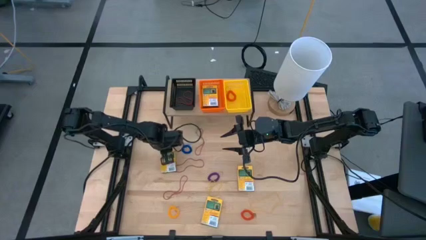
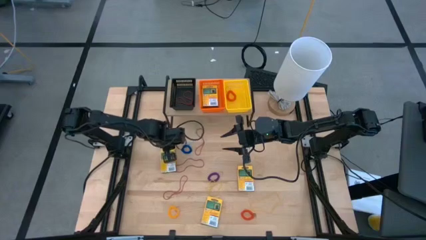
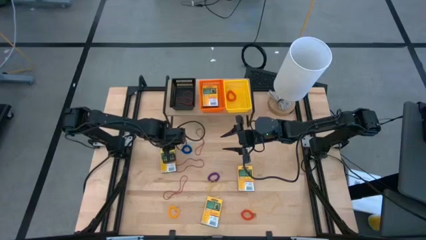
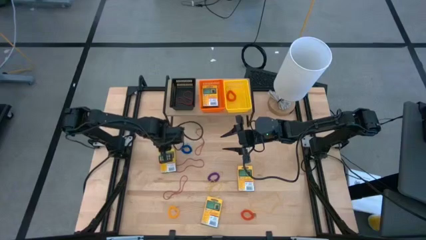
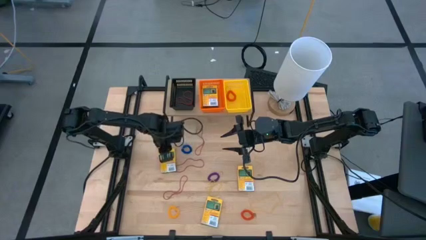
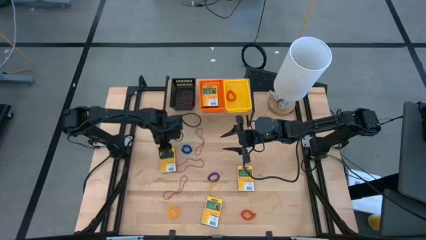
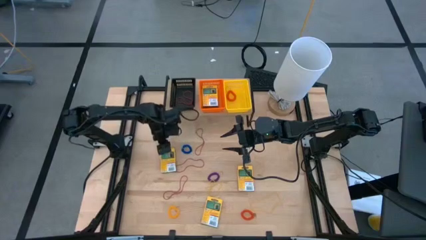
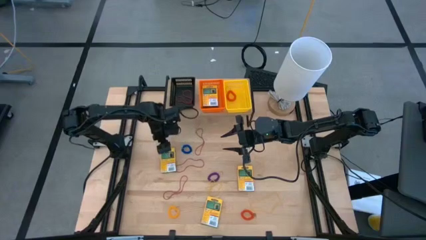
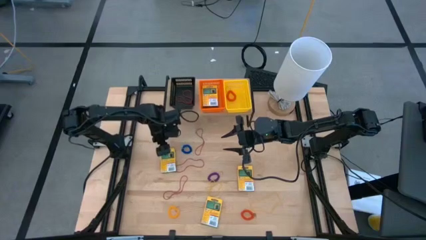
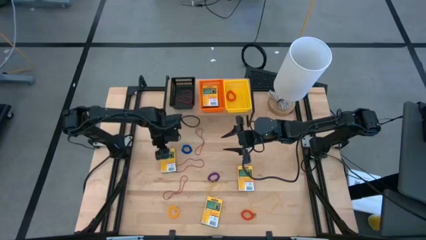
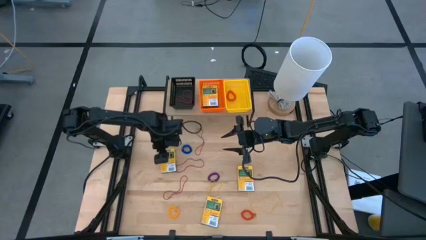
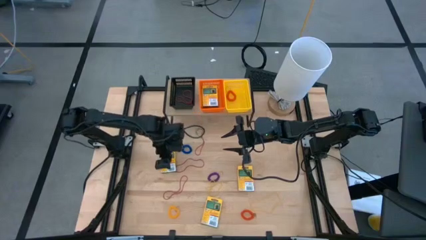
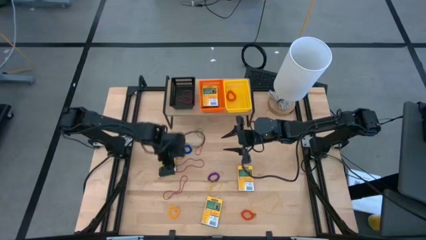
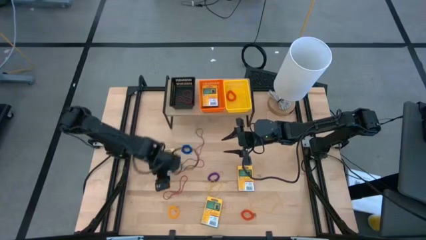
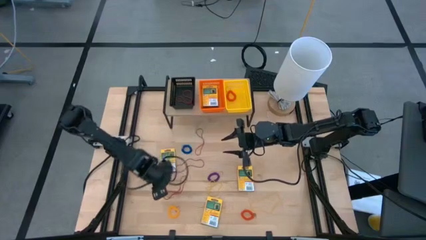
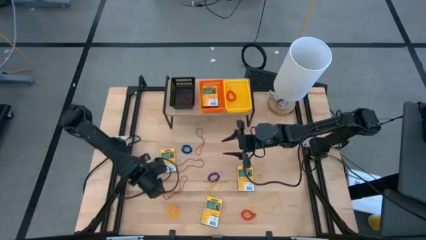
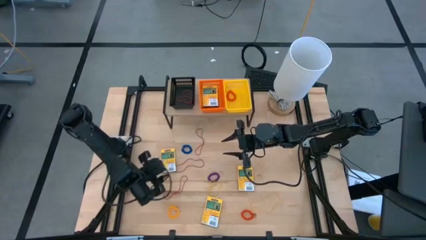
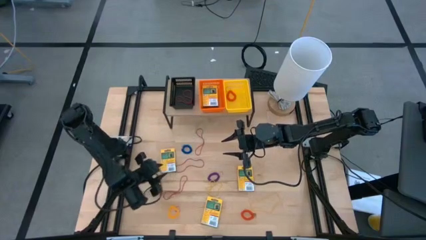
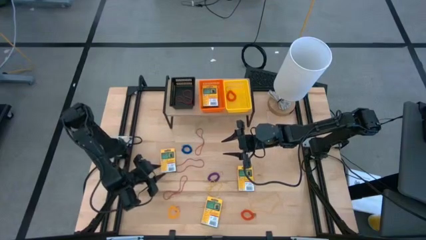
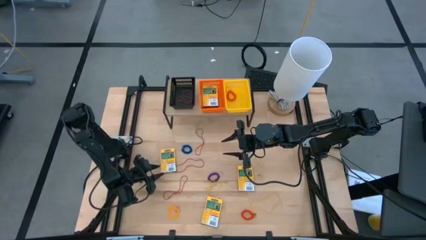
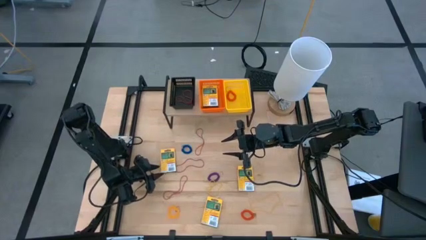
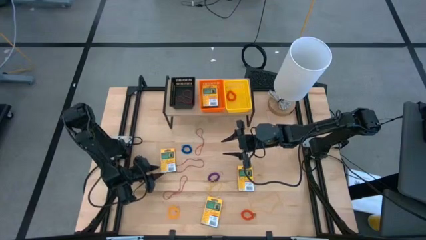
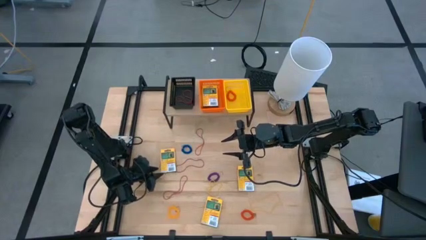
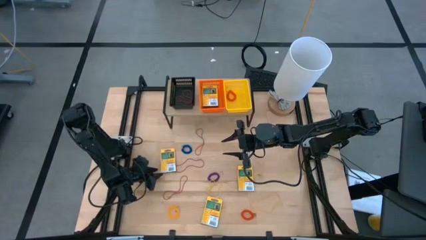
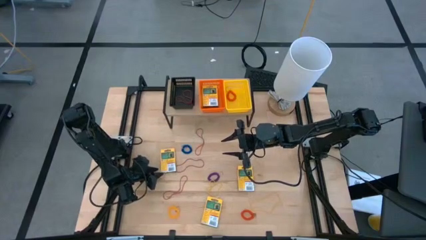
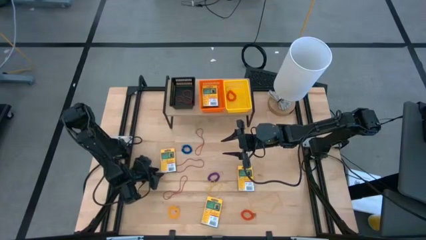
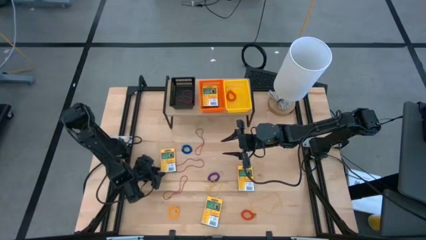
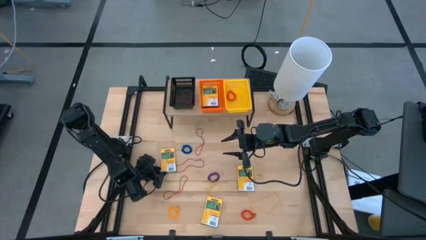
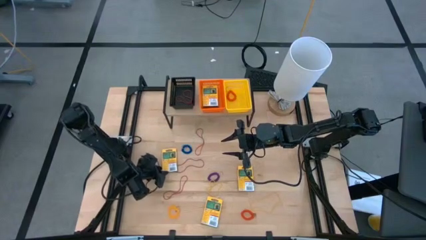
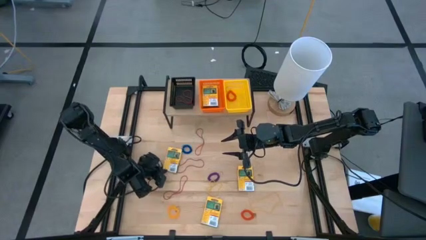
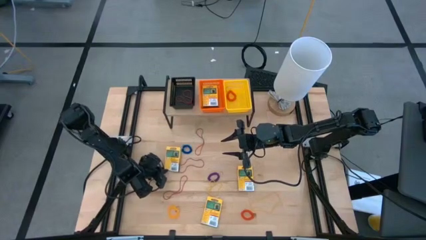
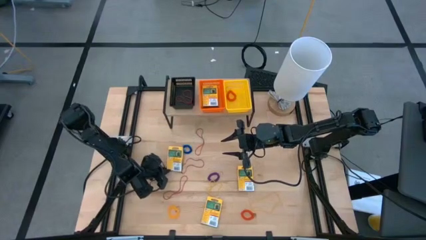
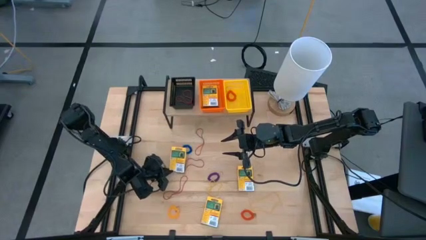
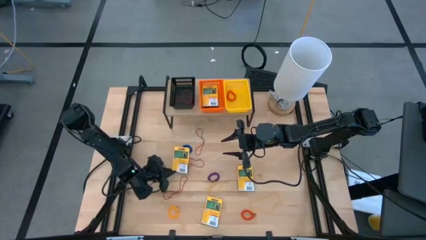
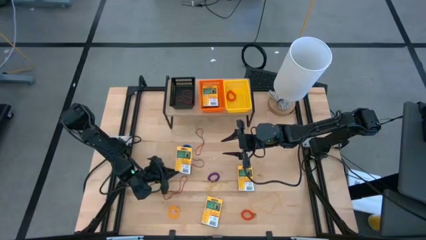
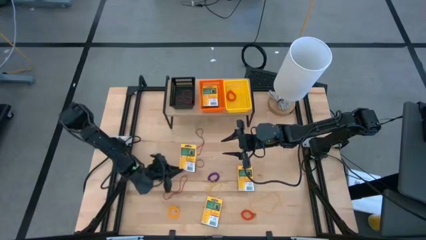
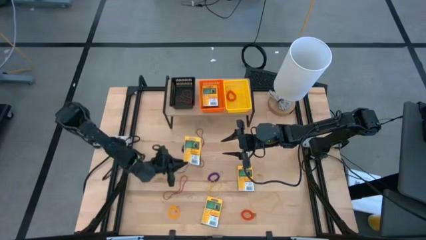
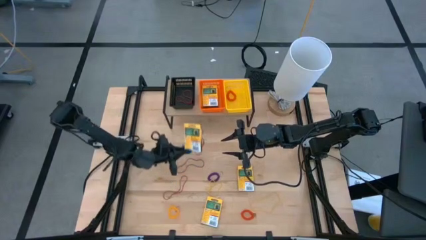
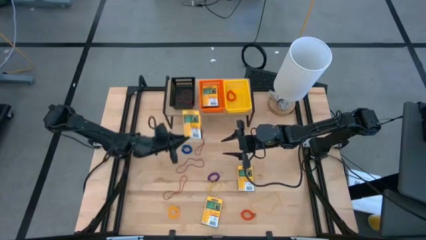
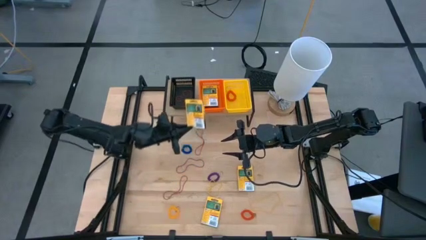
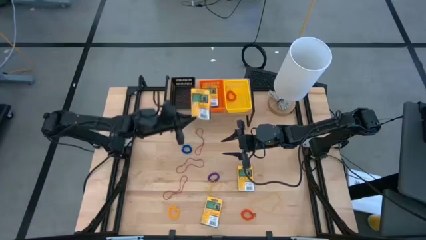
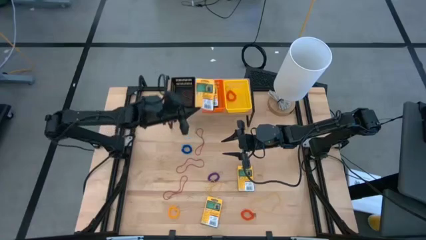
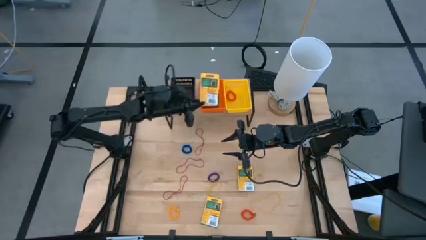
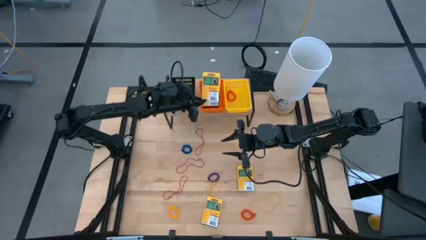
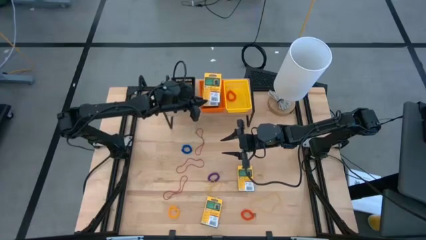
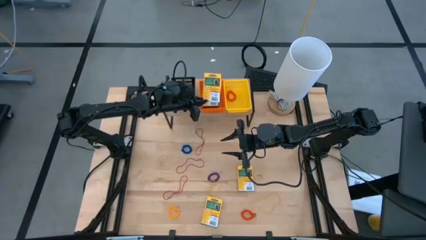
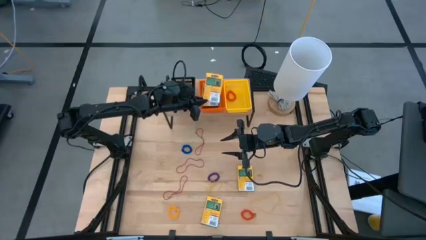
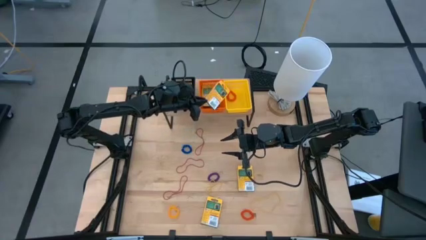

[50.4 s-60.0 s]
Task: Pick & Place Office Desk Supplies
Put the yellow crayon box into the orange bin on the shelf

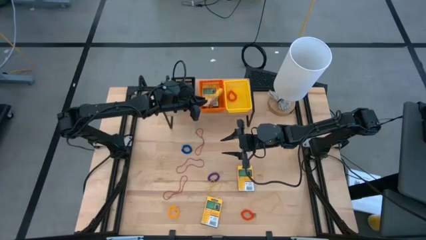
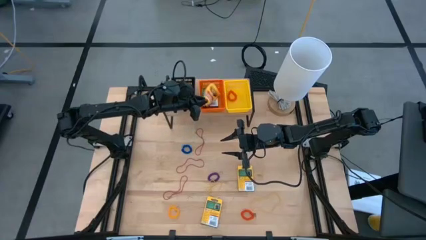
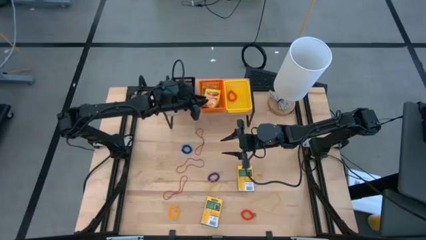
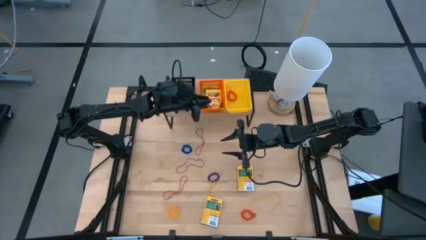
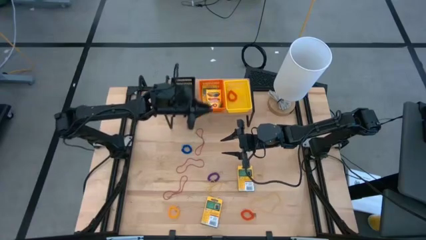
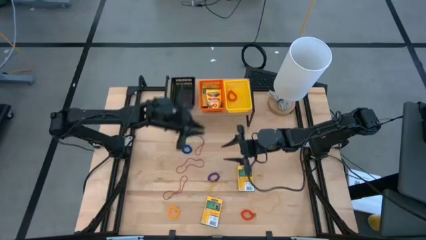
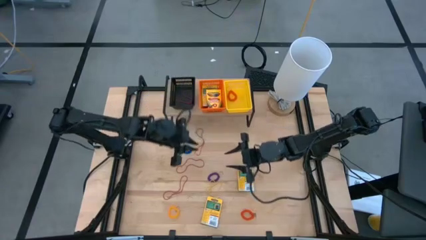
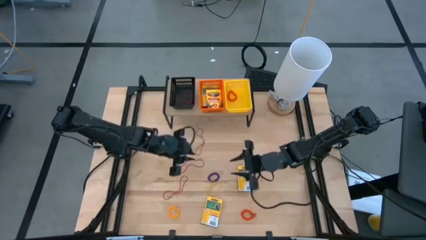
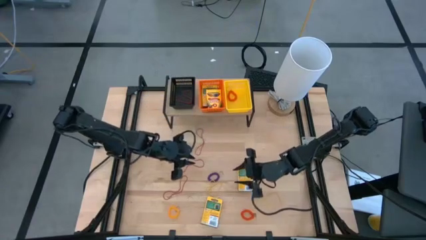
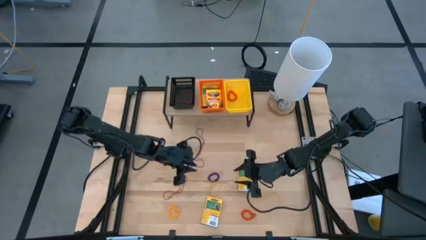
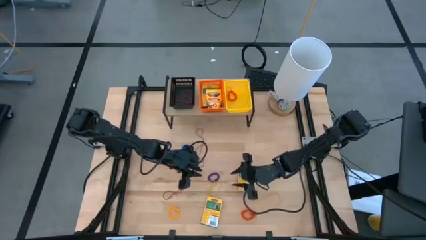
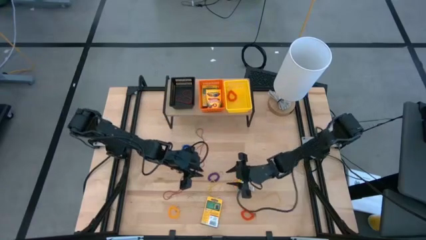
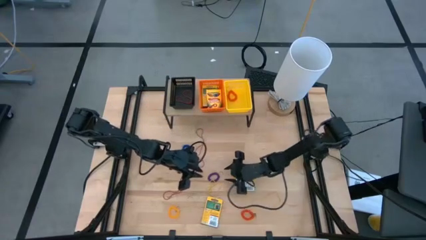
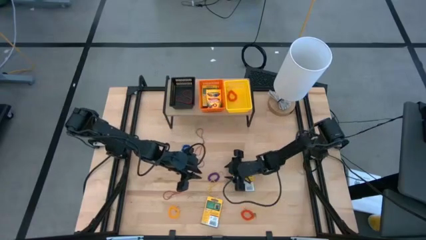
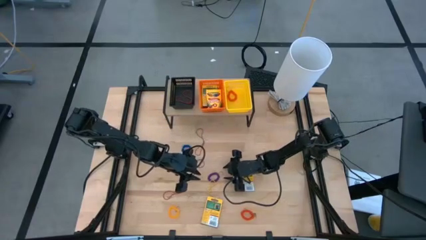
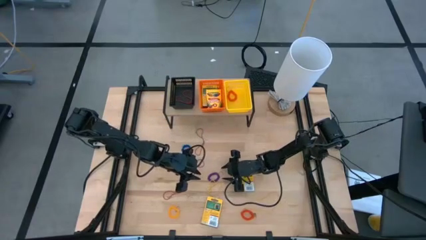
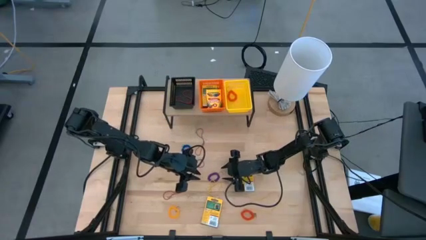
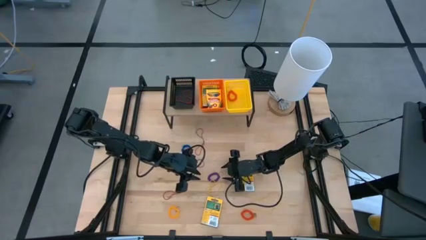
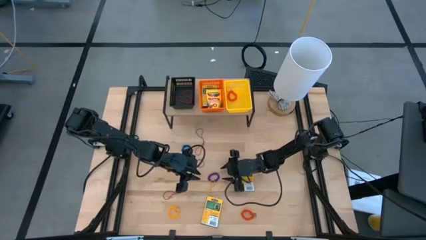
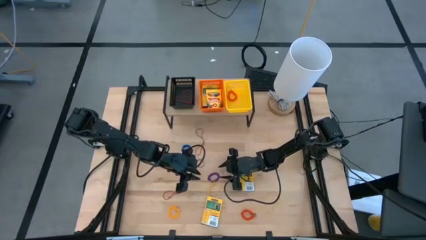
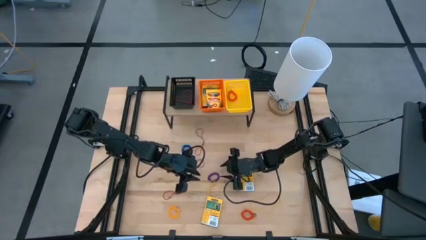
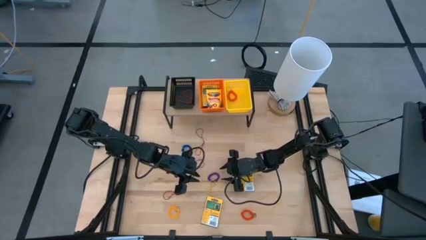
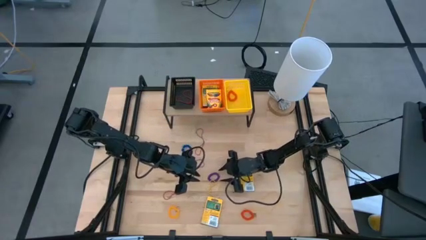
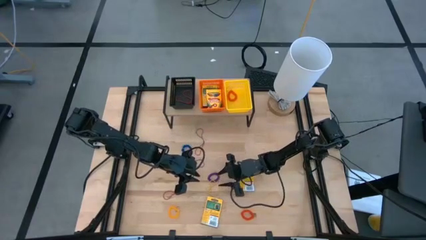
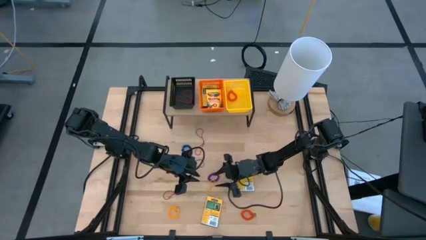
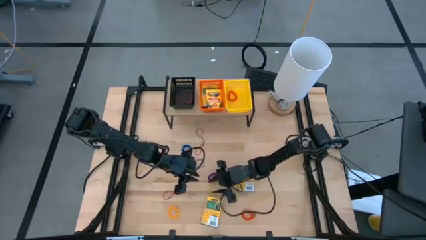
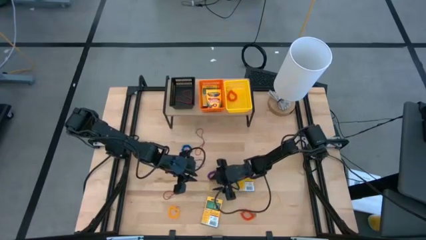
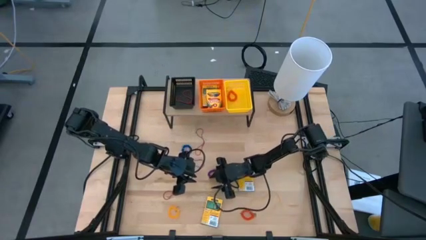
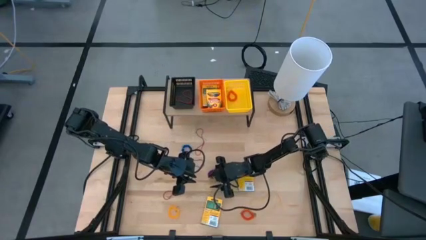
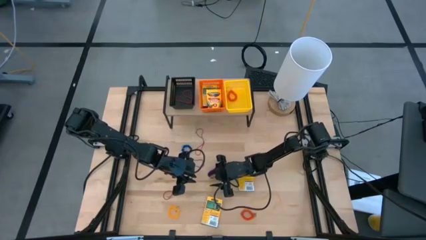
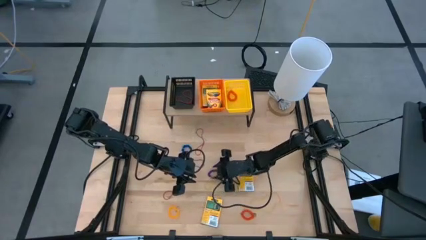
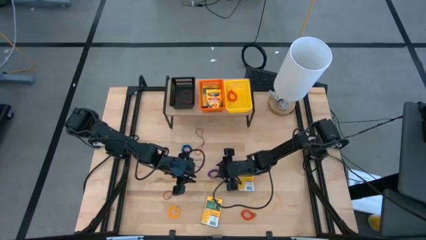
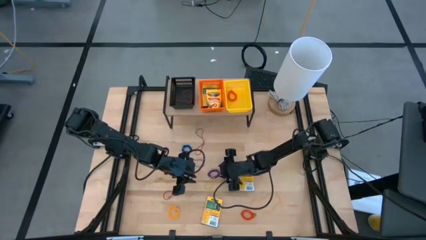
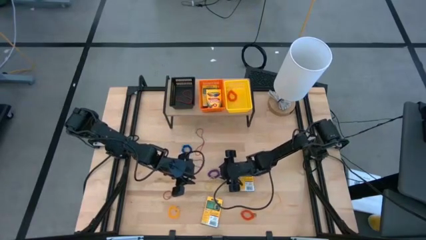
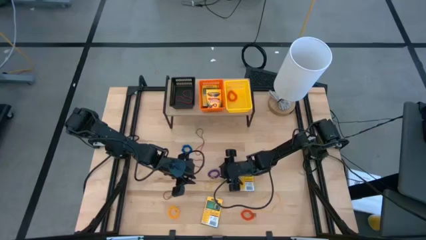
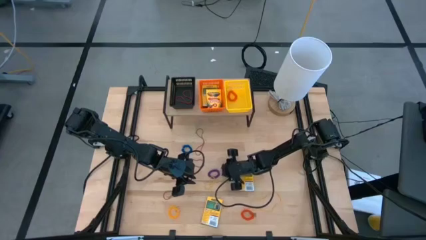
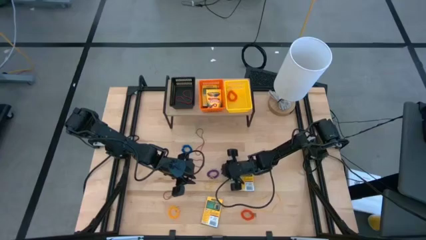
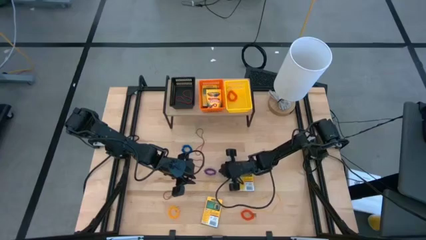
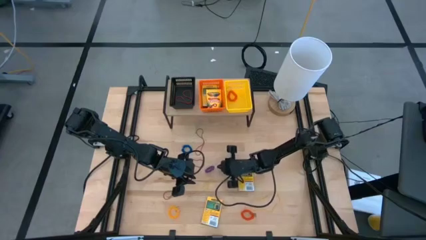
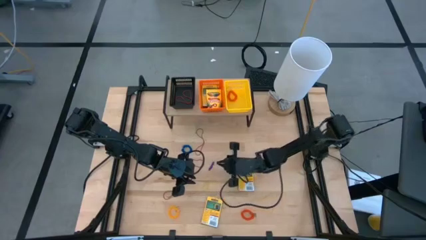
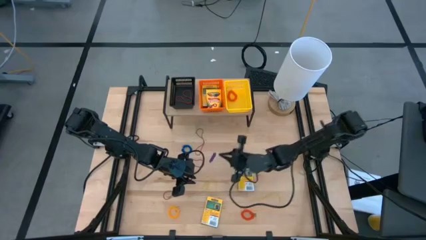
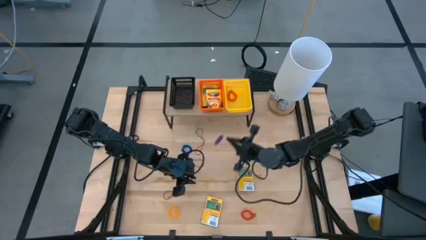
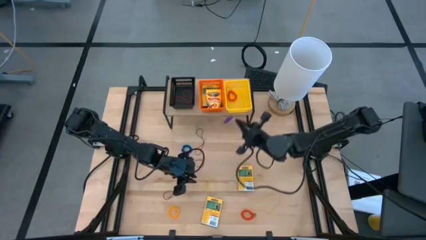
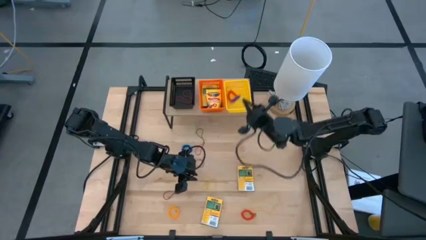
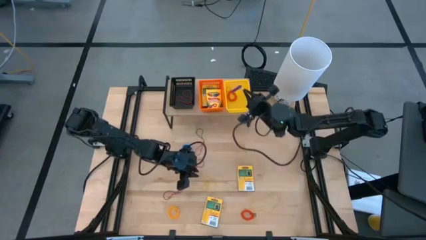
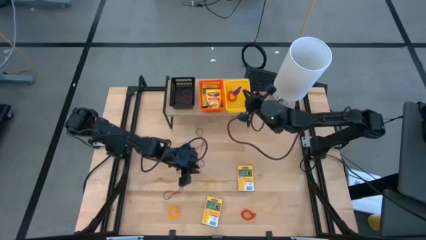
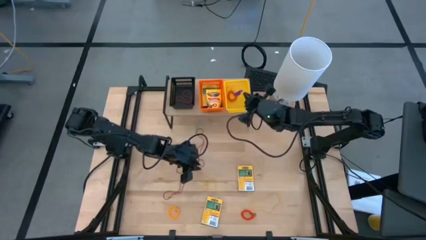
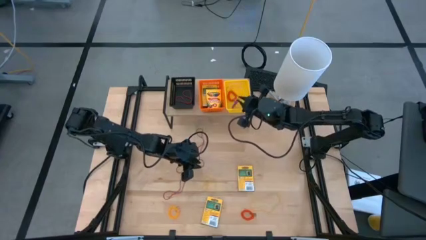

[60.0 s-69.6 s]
Put the purple spring keychain into the yellow bin on the shelf
